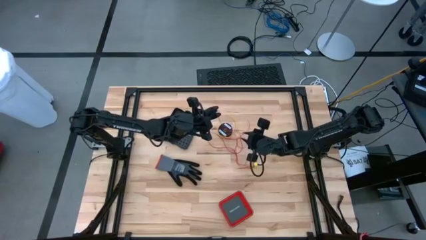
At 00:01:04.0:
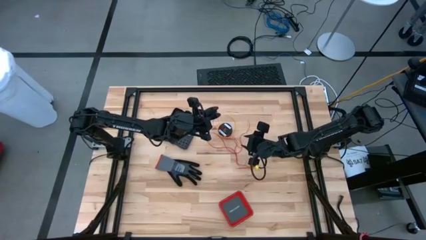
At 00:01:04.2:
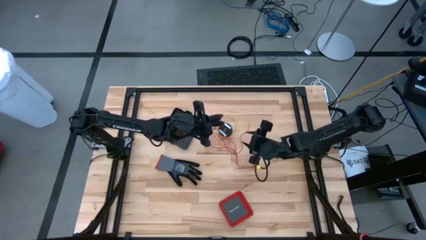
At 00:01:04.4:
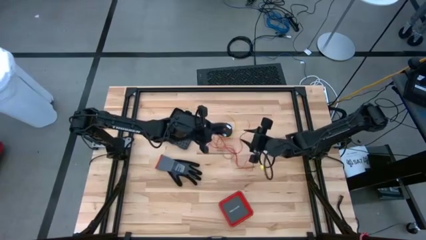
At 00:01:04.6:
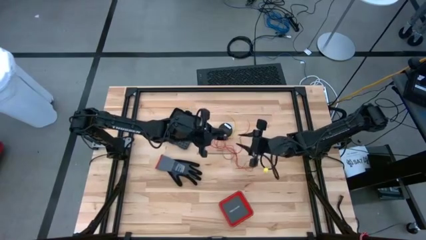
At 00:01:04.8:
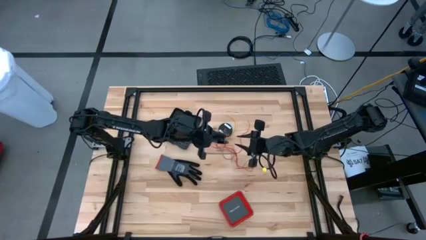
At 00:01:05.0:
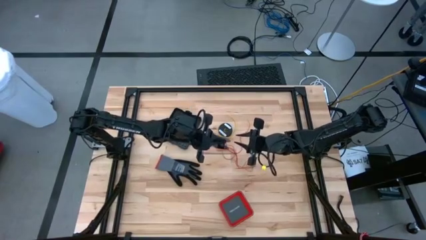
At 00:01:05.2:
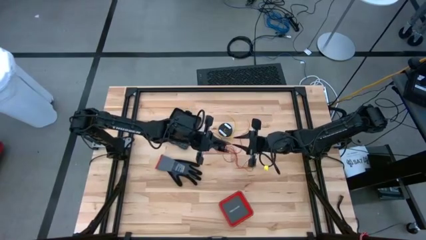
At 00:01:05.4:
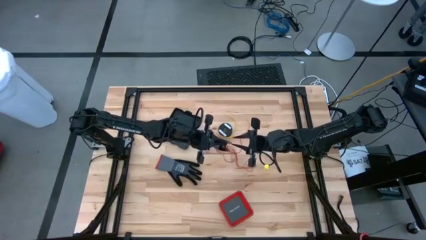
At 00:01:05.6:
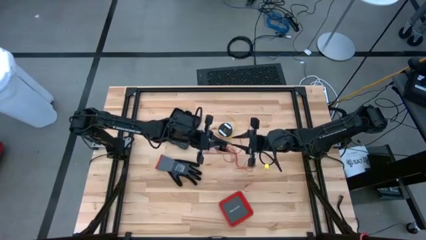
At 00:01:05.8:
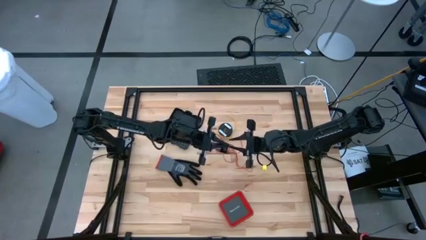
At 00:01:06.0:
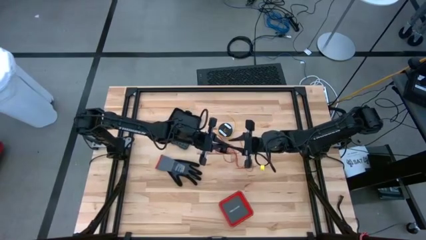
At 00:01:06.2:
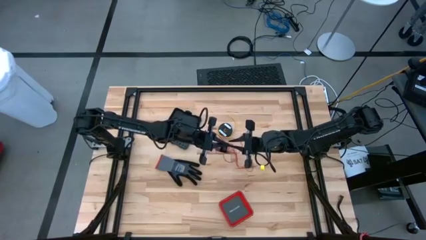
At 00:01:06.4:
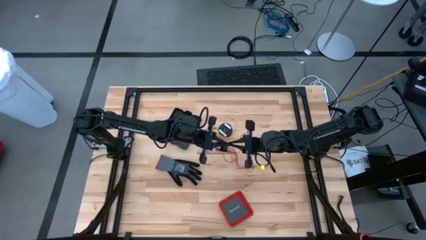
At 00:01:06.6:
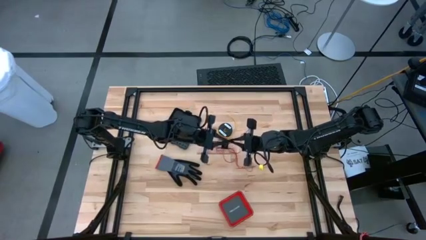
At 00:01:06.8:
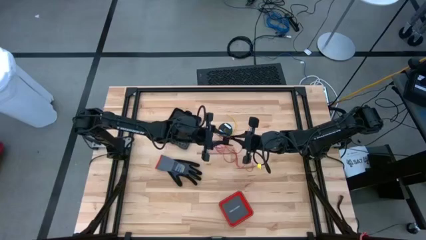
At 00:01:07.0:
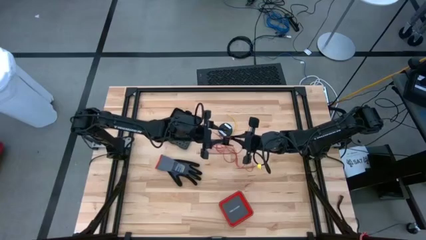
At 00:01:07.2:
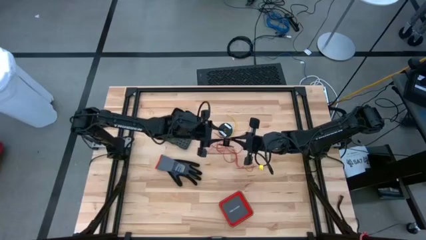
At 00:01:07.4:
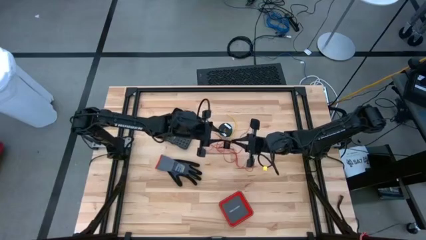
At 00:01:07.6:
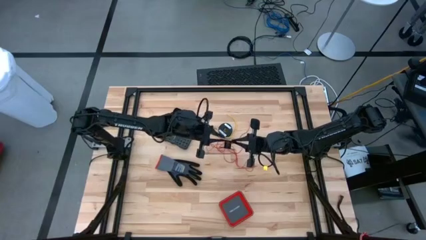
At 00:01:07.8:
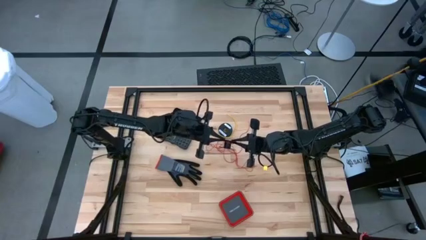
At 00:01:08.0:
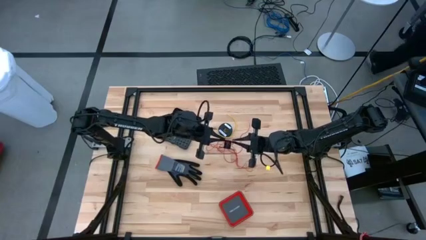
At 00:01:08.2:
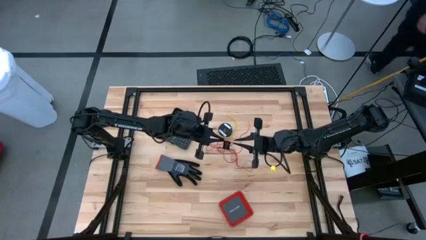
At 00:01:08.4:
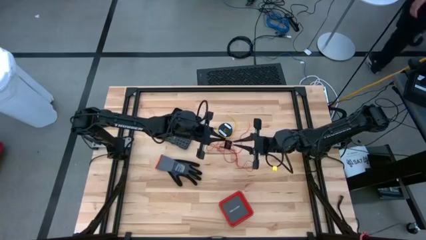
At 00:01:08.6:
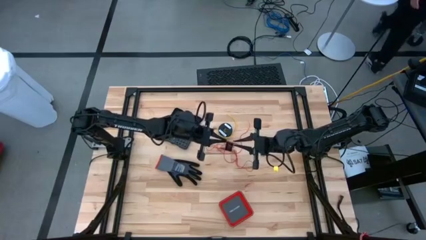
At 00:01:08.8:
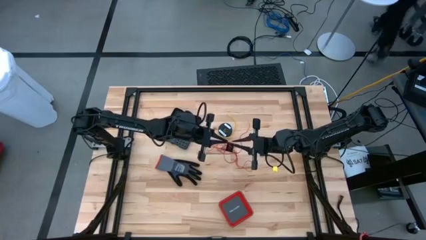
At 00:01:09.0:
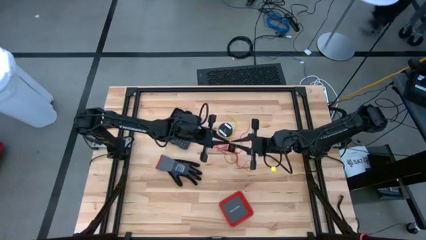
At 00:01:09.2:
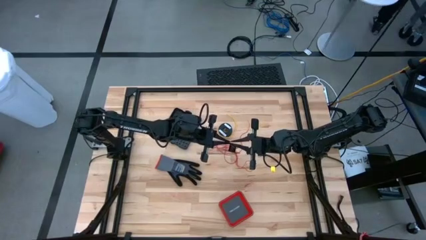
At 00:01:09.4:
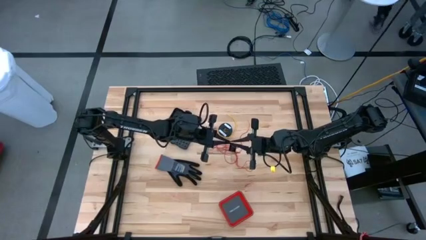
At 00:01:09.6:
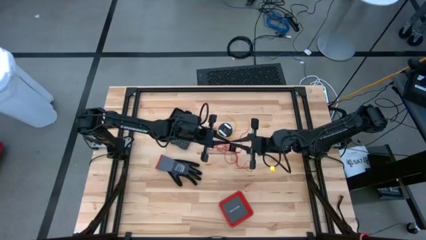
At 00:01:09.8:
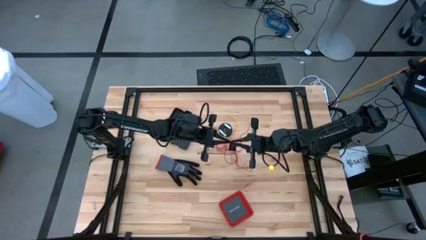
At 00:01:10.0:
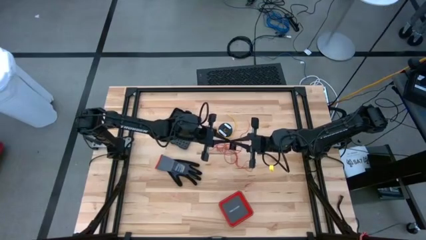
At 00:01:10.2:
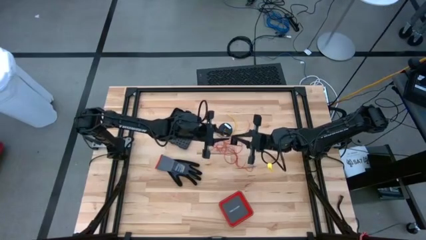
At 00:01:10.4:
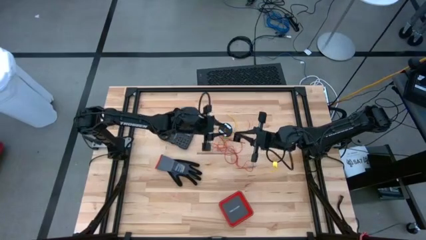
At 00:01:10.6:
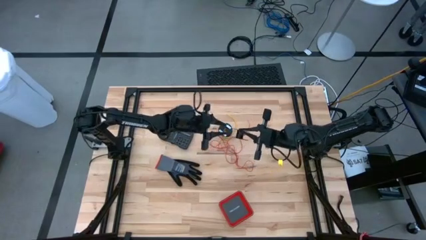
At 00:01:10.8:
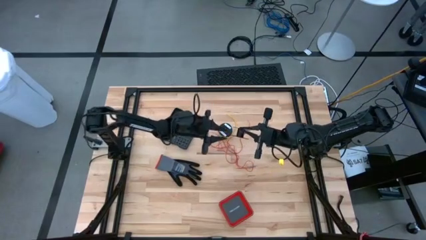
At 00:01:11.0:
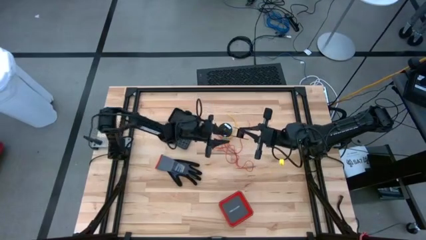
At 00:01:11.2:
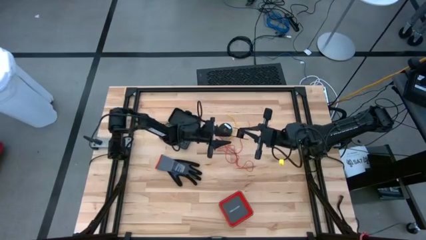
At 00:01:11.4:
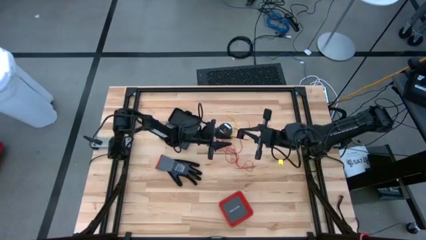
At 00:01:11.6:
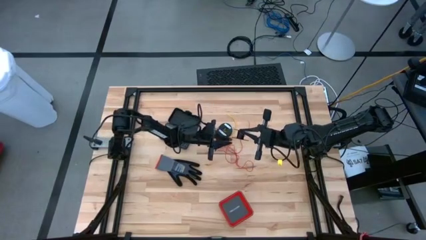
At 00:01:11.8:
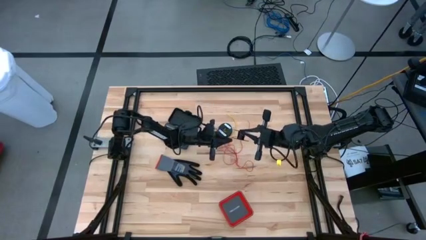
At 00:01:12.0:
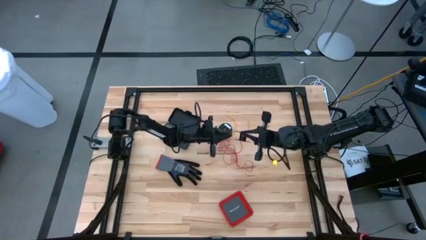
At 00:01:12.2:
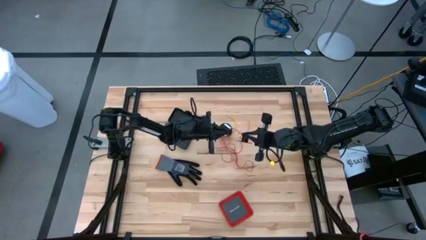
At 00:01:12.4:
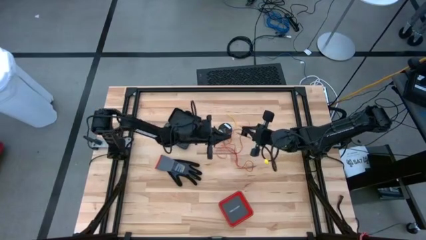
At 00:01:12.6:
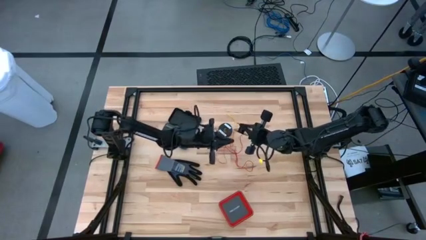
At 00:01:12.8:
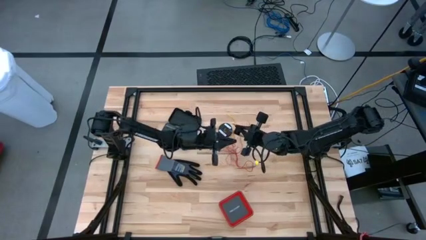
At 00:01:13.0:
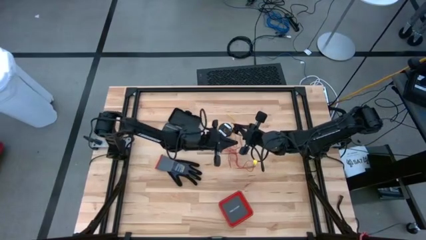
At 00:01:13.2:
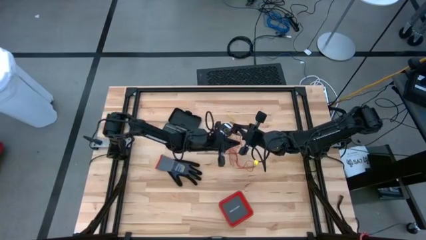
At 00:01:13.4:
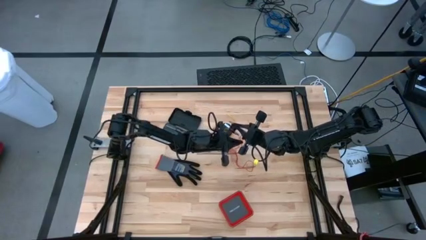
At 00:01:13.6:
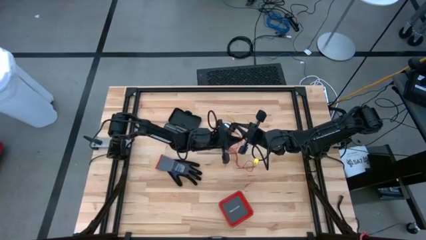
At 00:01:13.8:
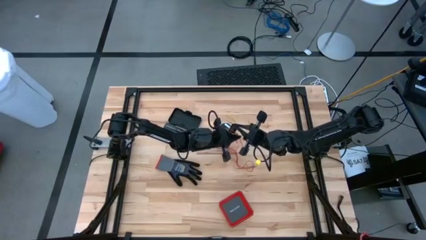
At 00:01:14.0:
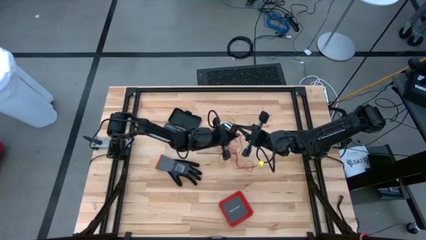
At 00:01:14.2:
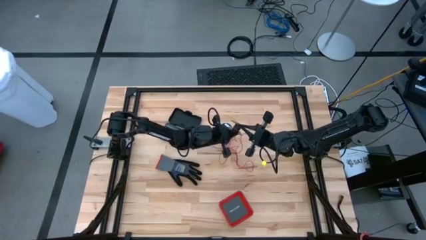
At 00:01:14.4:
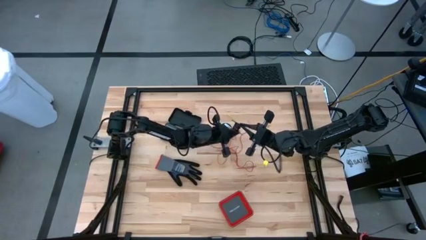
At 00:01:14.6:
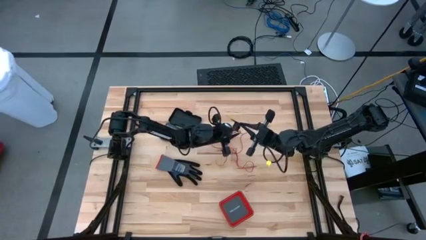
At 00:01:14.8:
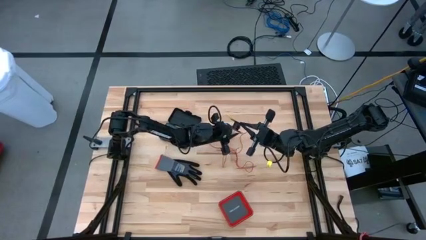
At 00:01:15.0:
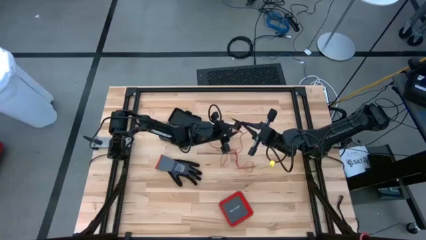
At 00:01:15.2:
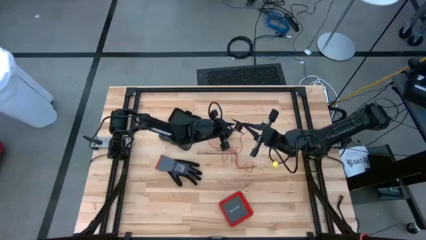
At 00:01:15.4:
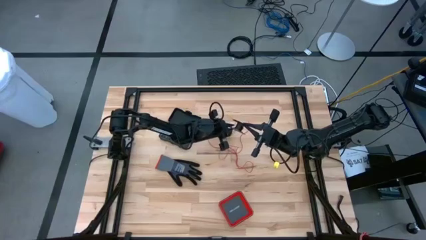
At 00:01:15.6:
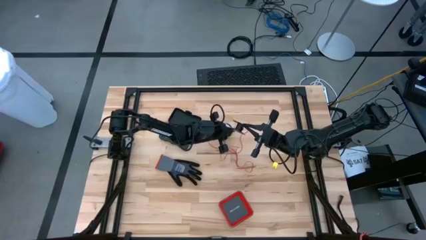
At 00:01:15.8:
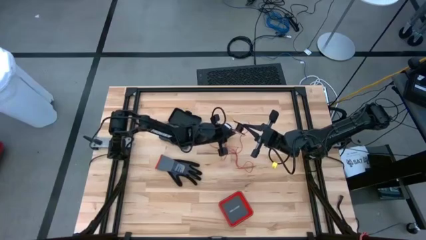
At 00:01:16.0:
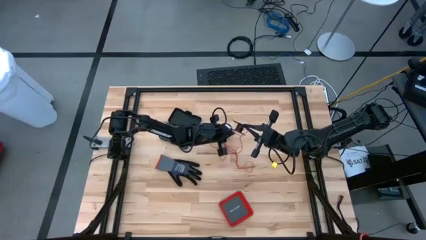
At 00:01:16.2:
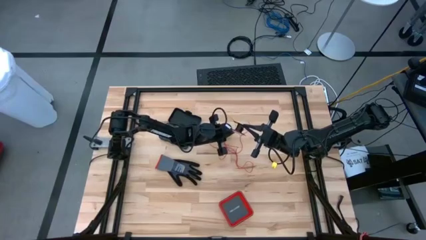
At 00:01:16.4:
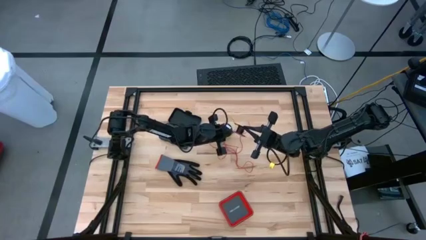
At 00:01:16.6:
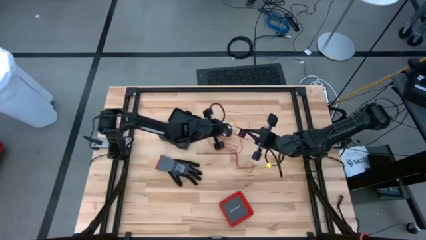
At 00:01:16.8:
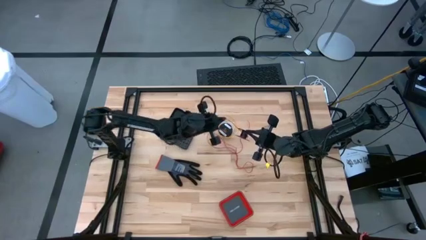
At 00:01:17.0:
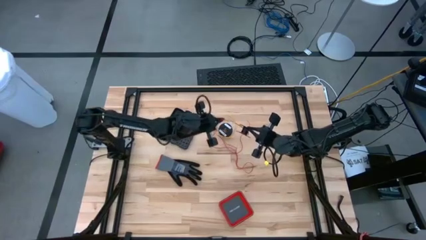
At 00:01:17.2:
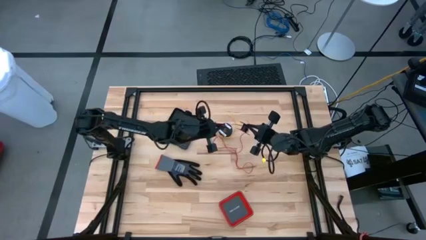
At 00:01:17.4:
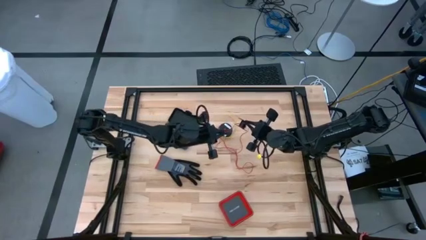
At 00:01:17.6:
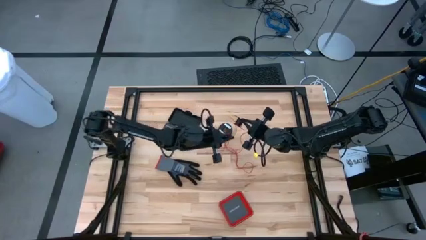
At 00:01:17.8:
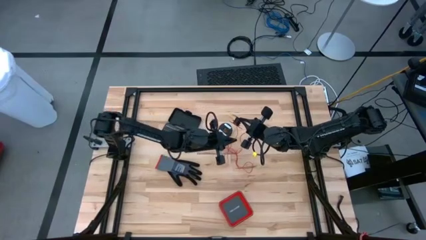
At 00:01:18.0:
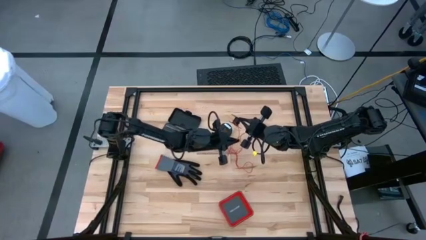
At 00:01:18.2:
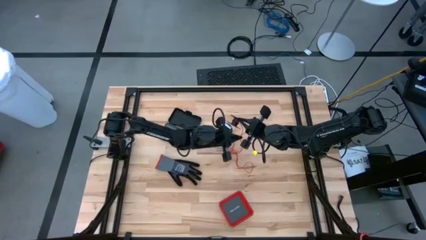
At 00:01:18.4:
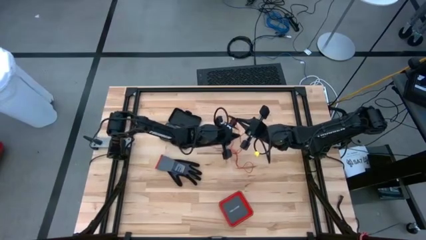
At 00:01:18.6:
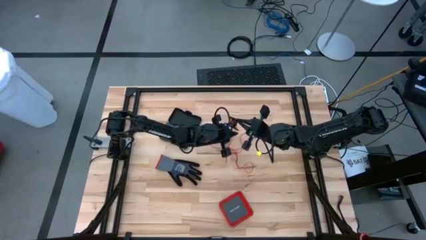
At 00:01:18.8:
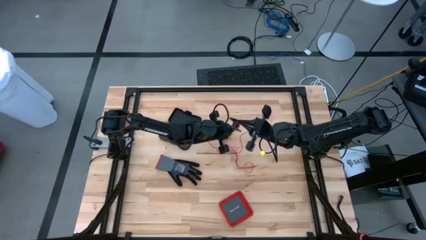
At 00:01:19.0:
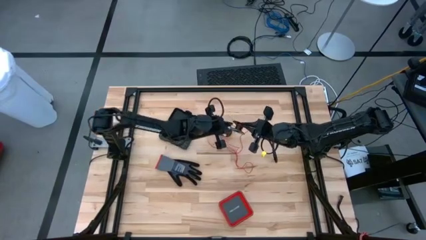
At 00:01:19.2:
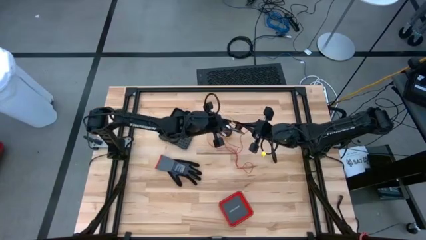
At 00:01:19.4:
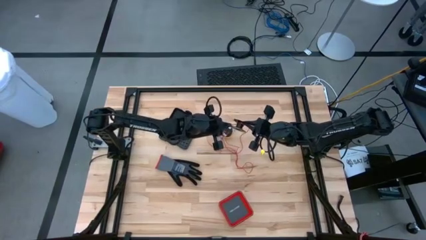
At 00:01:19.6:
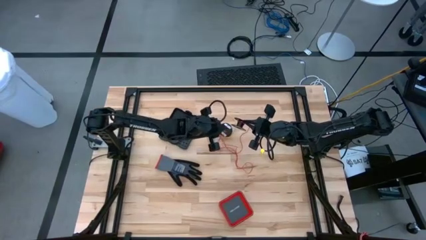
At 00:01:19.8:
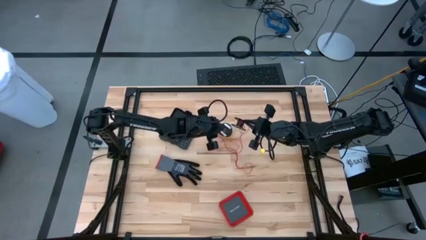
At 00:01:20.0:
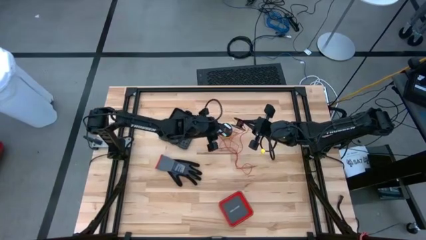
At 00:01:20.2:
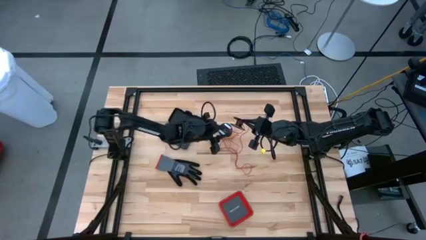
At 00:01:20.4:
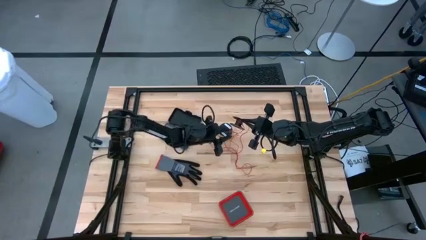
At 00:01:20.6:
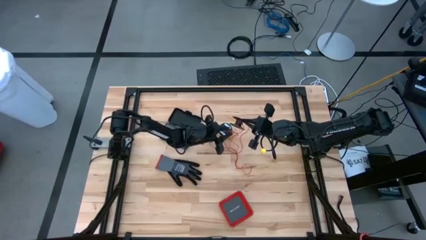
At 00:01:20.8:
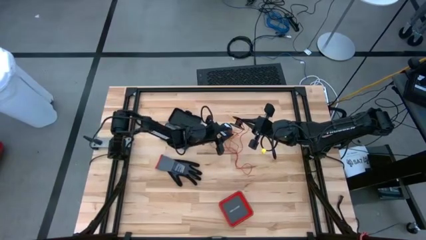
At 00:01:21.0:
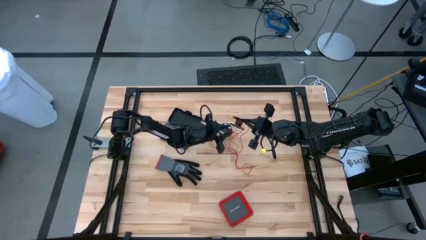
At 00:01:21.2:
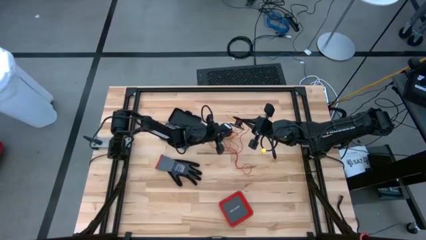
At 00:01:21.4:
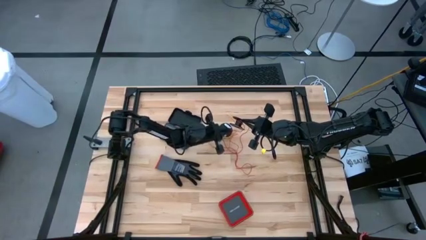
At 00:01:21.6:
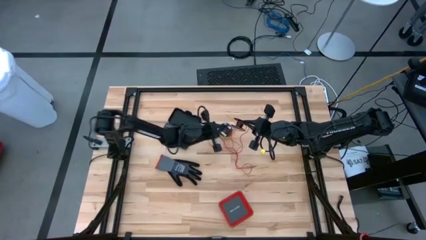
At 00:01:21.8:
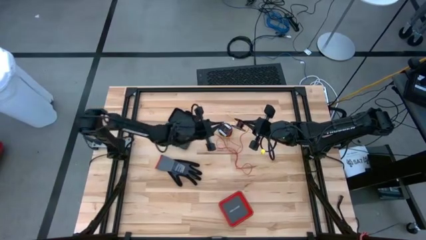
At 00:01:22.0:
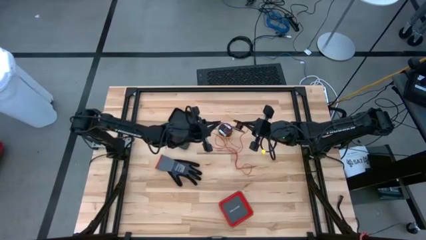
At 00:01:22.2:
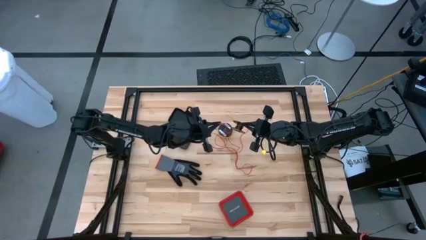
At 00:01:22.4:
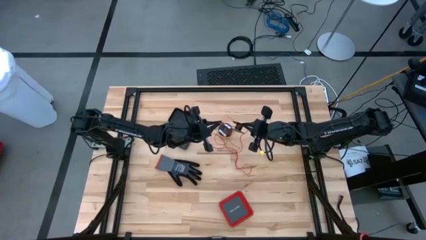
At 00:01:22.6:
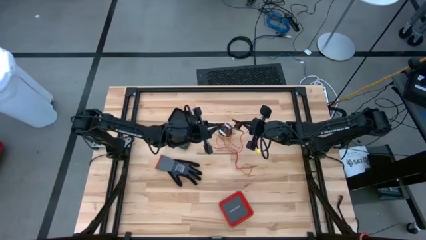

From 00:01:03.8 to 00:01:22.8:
Task: Coil cords
Coil the red wire onto the spool
